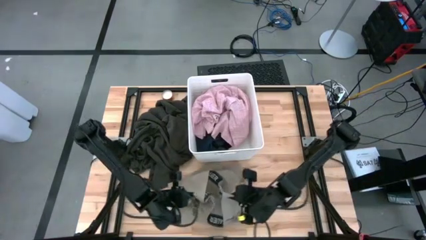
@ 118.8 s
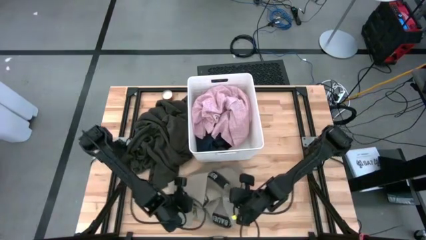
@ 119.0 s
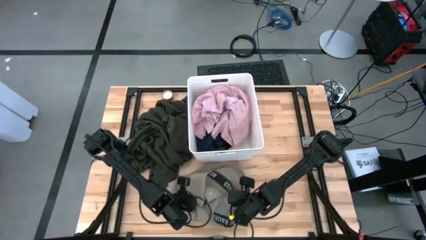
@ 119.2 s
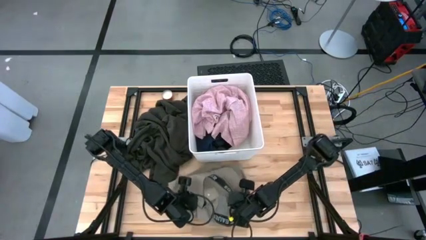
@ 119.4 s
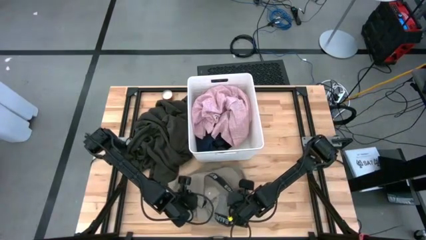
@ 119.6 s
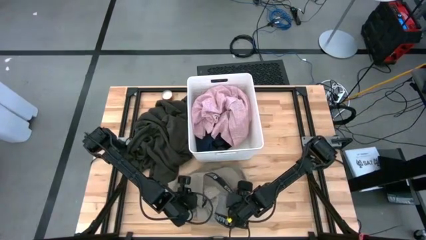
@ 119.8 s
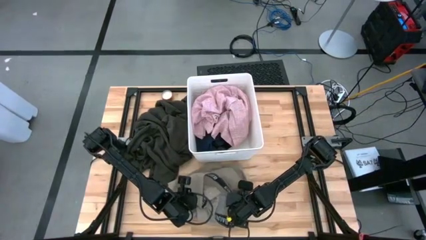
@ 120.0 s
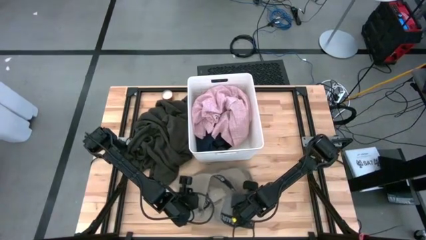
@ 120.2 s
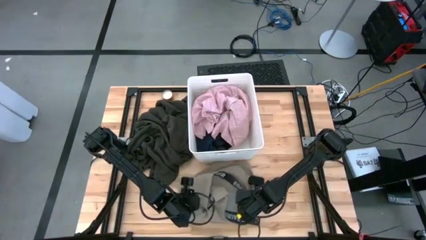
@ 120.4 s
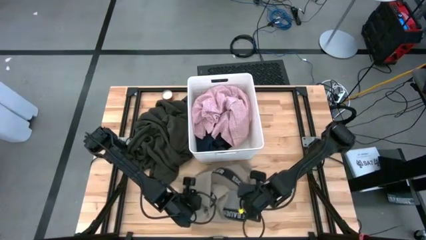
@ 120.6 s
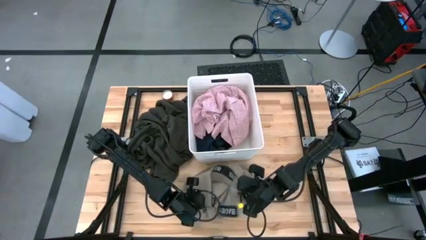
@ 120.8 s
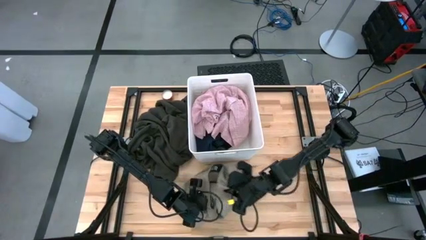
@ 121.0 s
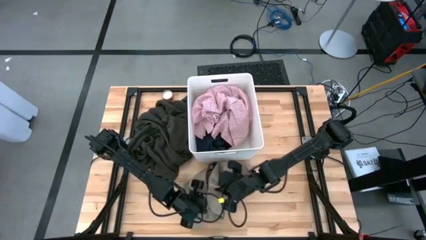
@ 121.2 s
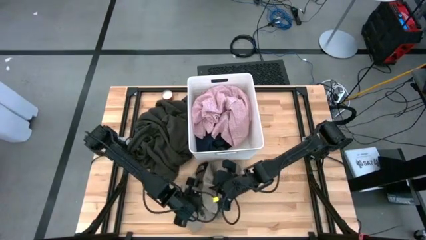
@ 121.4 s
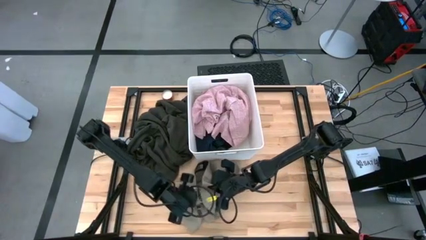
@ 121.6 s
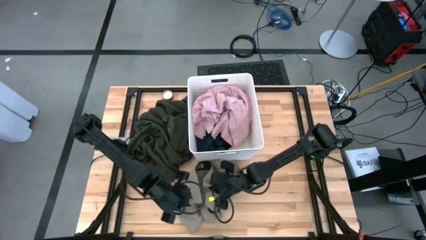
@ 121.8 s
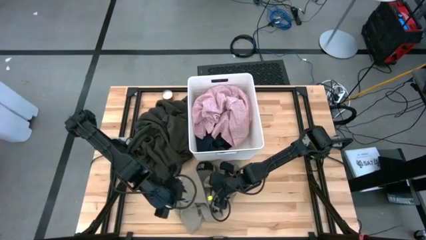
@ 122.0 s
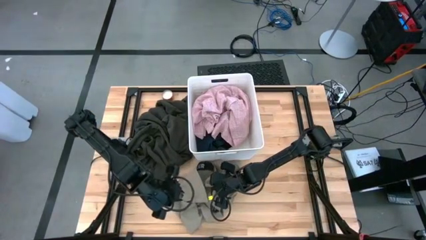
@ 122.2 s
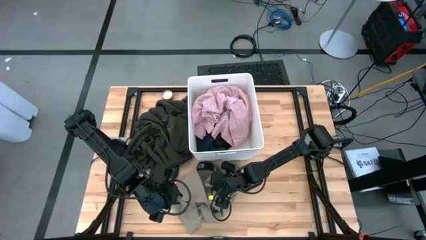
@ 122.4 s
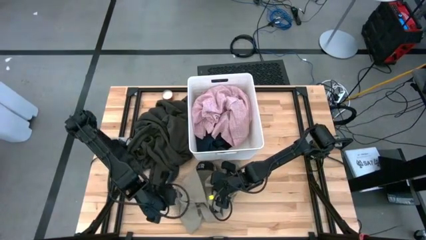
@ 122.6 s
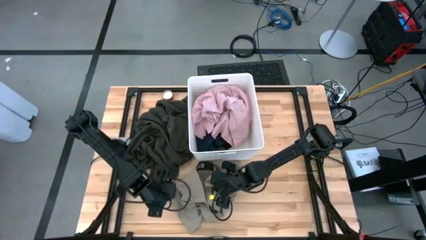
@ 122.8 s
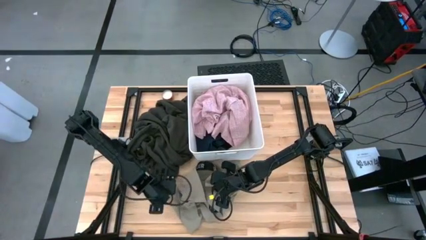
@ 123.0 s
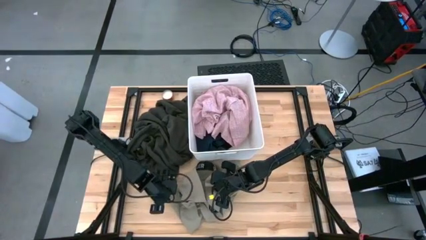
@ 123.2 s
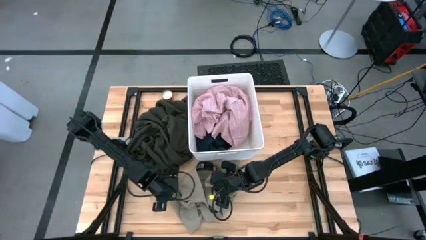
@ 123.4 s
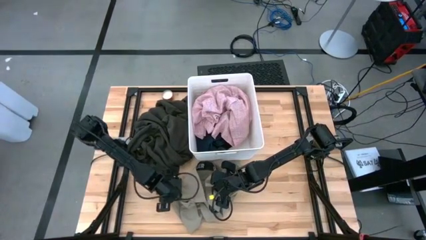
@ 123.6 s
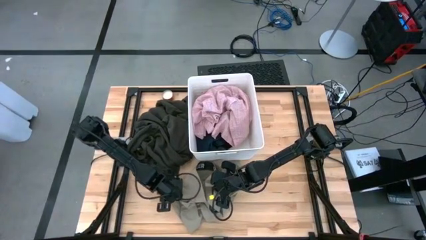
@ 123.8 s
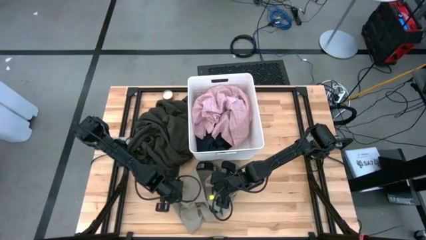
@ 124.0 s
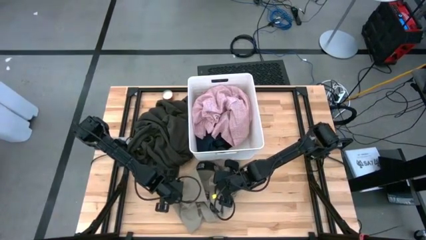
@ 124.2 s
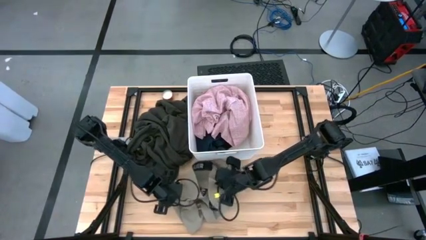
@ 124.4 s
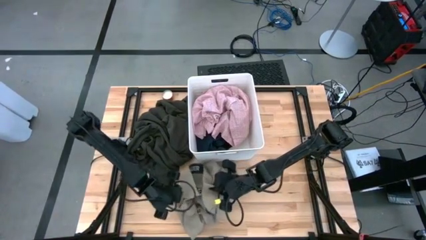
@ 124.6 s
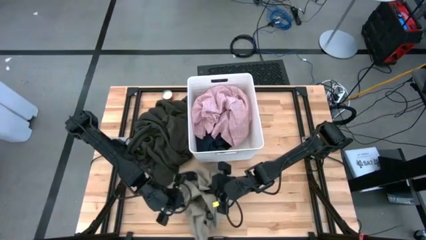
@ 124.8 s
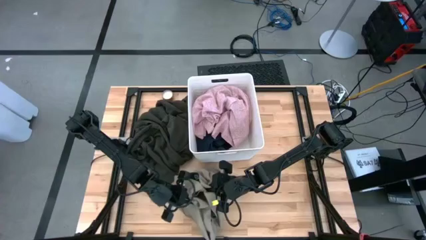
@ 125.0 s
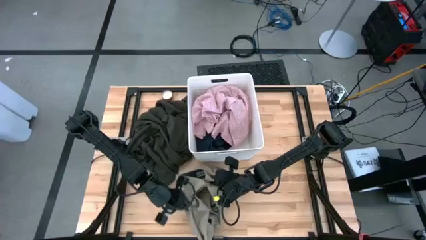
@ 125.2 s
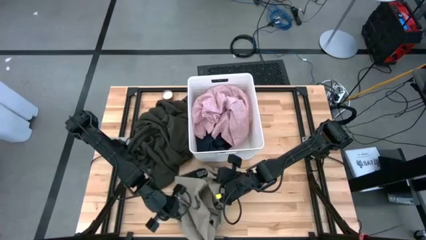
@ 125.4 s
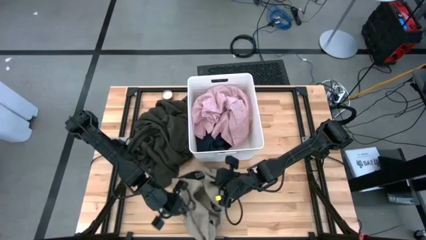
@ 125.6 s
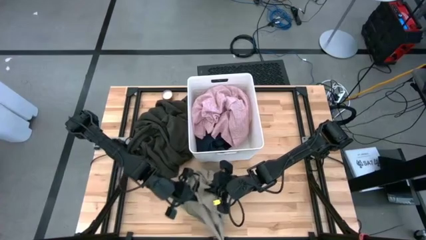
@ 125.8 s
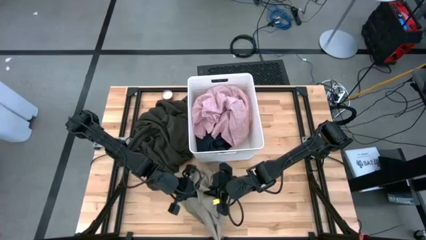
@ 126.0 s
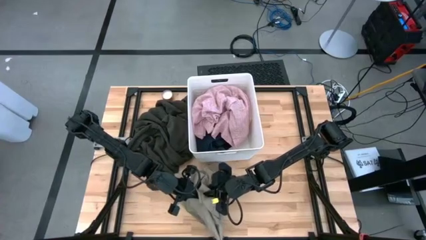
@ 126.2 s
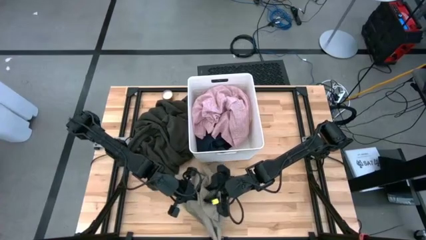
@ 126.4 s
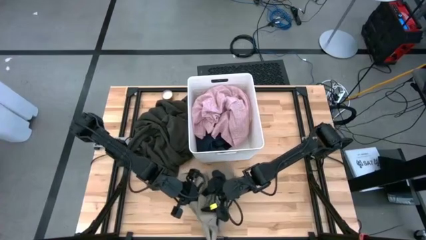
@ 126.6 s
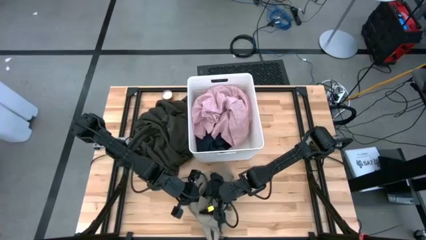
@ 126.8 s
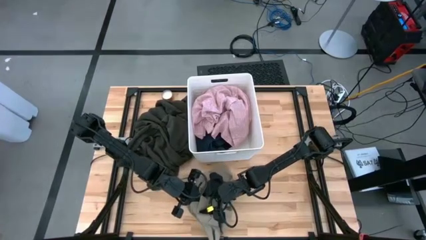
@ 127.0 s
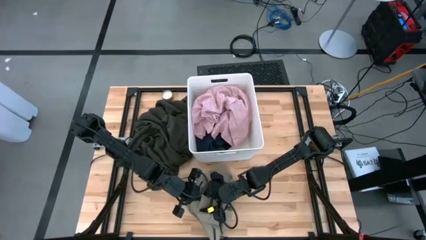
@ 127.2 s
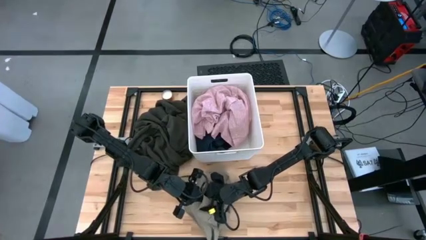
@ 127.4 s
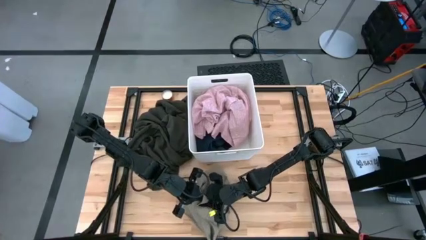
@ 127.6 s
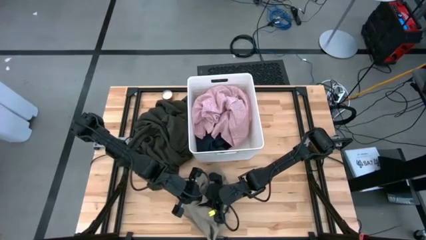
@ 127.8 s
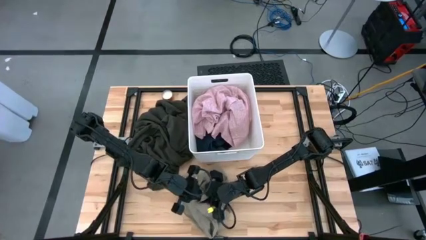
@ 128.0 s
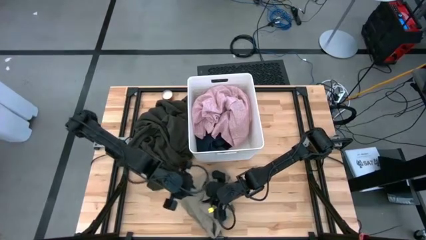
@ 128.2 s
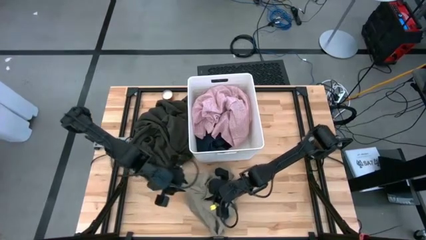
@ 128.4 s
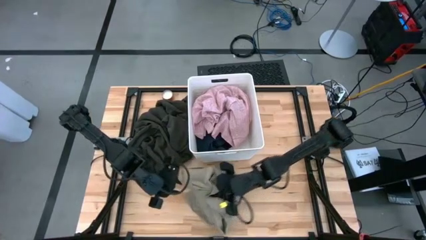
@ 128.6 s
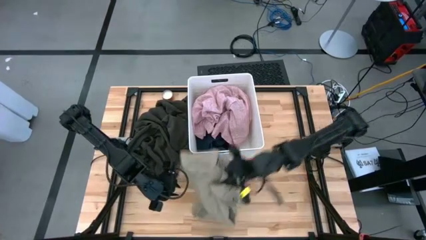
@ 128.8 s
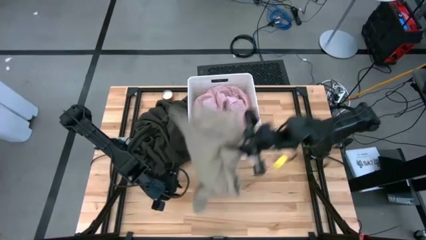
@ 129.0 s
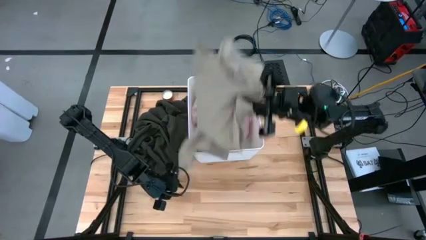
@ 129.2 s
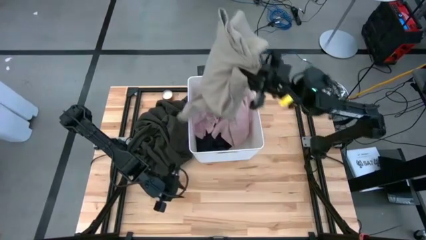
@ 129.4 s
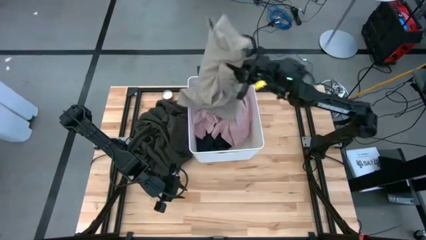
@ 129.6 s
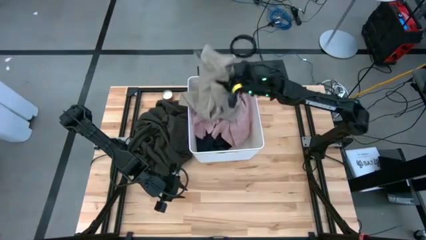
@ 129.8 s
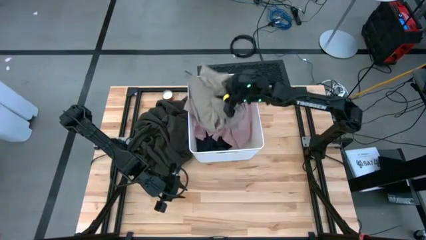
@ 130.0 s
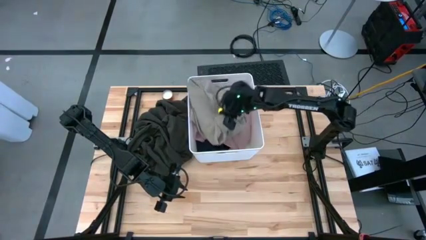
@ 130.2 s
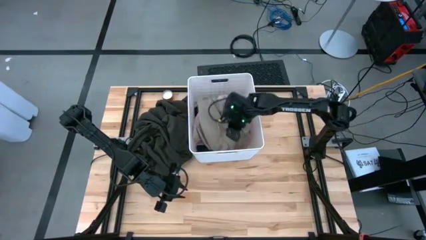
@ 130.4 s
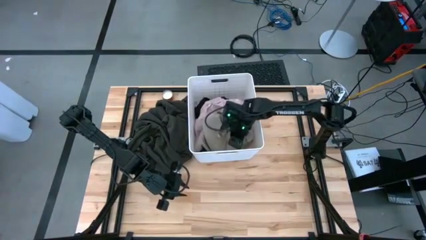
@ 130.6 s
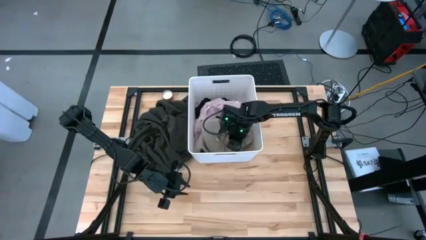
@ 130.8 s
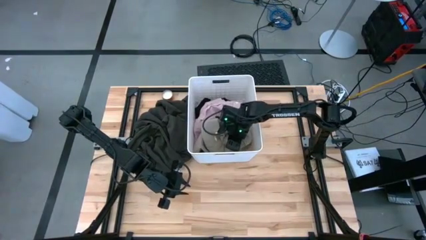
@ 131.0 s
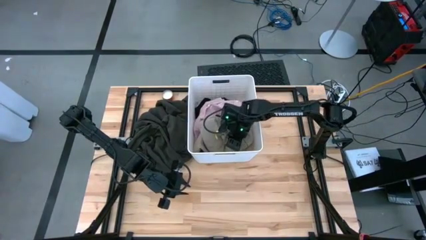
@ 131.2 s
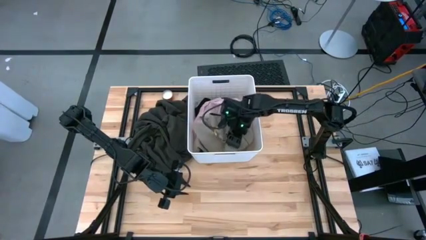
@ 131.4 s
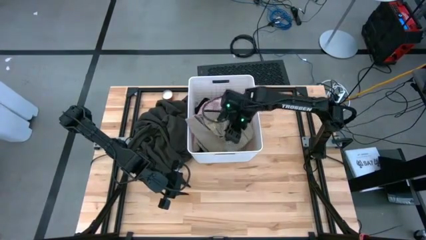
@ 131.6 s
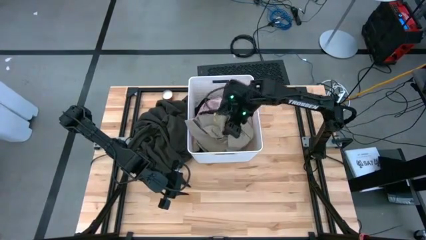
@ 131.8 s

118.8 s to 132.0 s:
Task: Sort clothes
Put the light brown shorts into the laundry bin

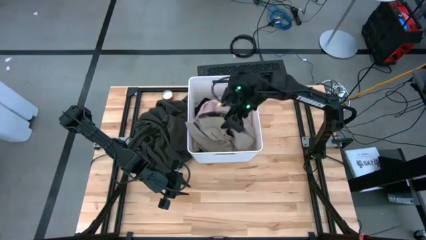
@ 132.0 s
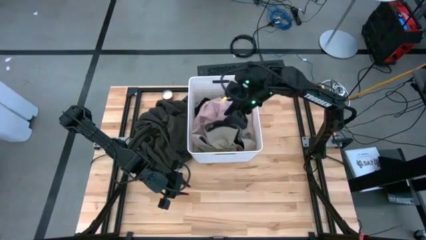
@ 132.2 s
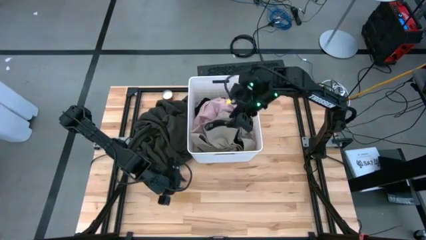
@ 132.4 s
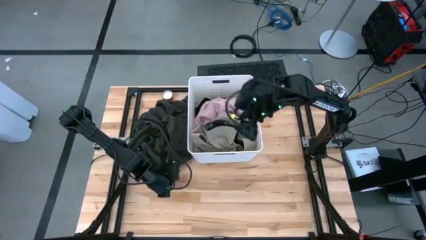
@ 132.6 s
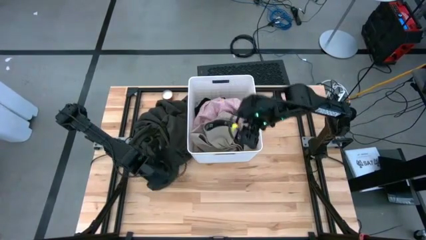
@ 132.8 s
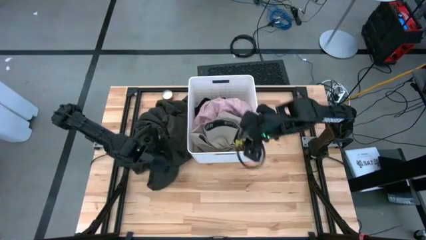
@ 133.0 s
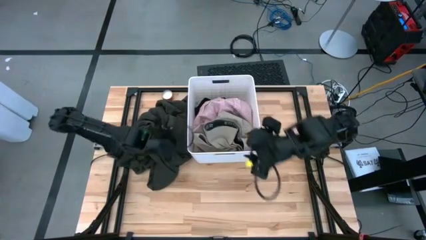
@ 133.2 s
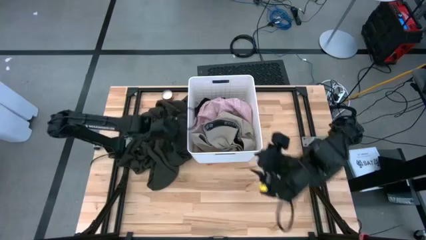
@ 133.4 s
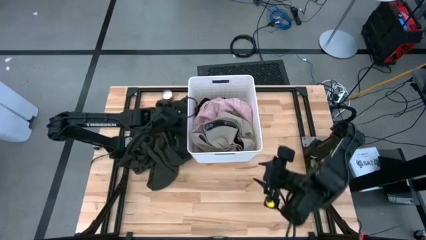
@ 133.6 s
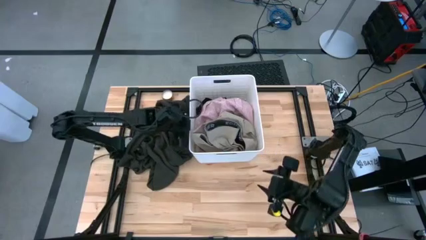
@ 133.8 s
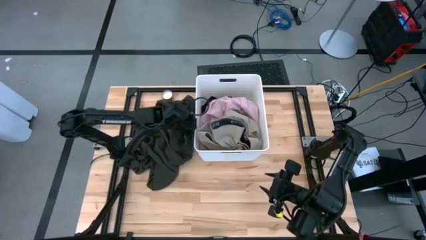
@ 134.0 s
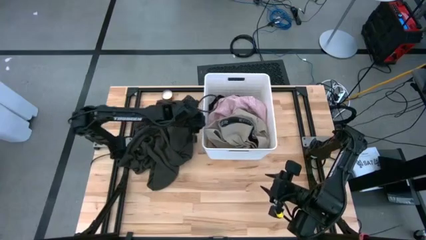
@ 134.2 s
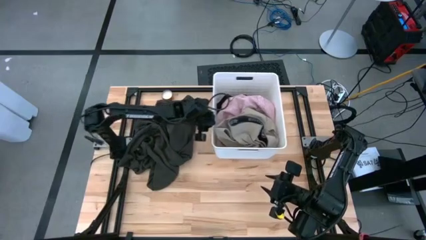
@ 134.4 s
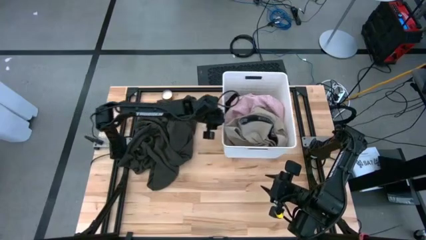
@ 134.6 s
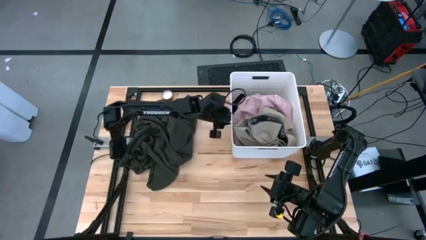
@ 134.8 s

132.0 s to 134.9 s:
Move the white laundry bin to the top right of the table
